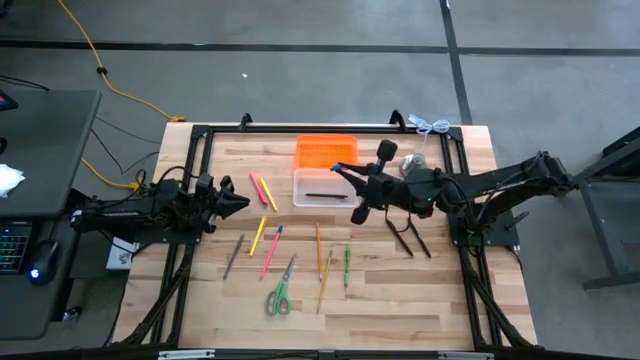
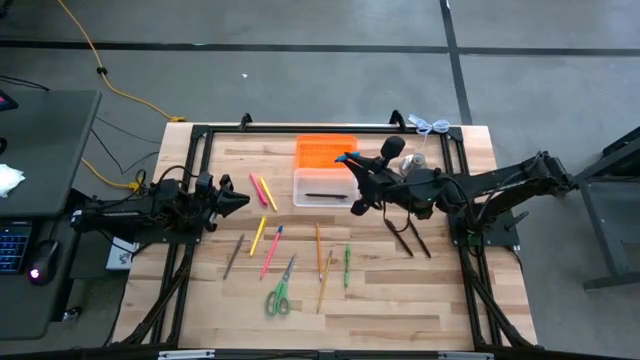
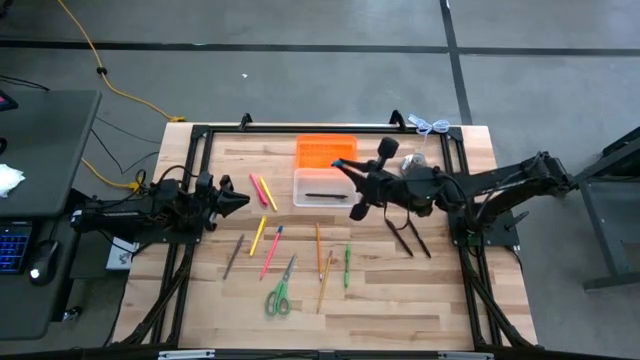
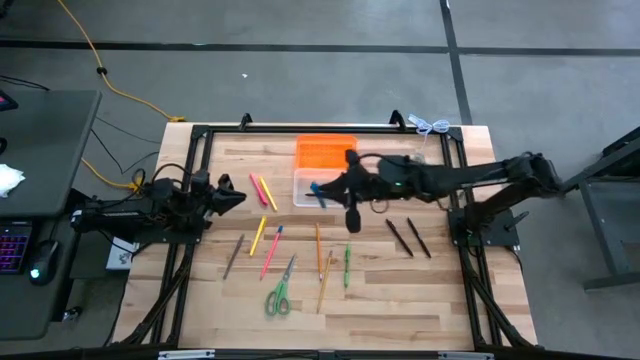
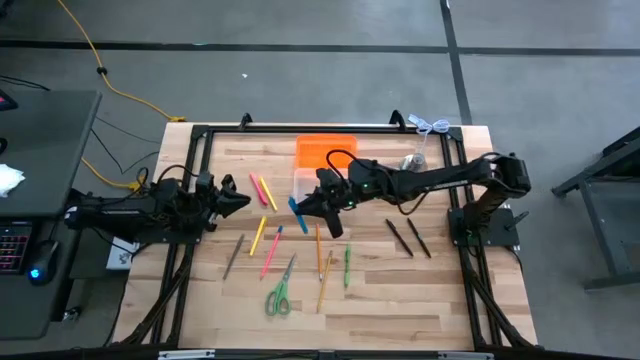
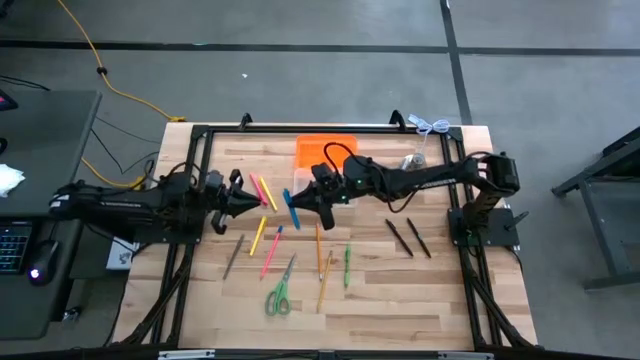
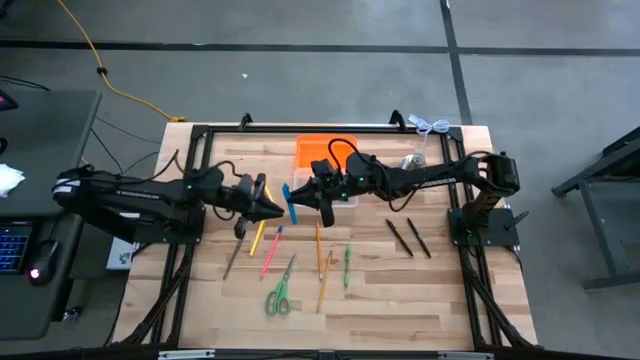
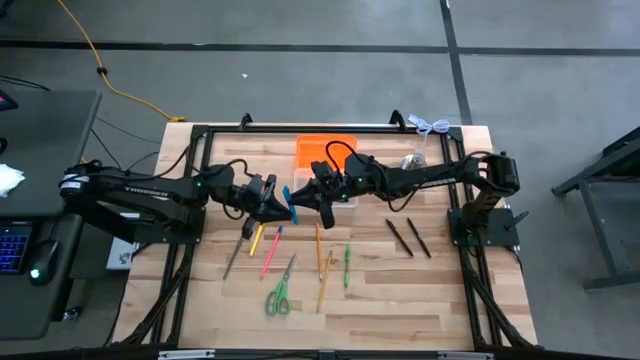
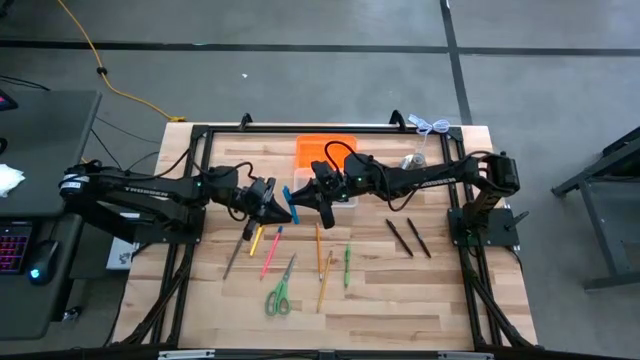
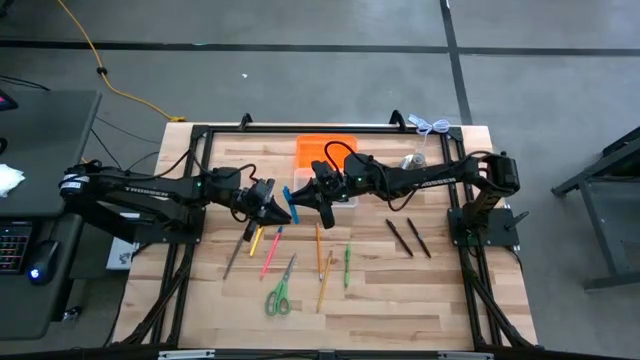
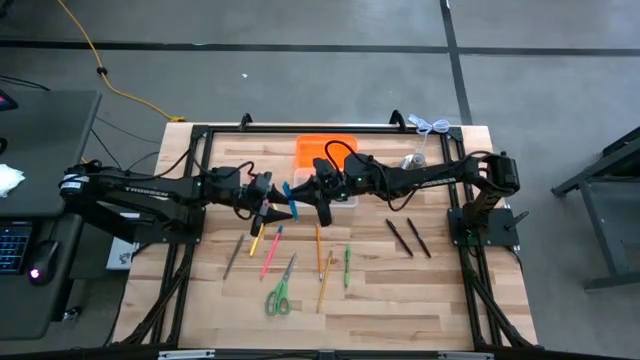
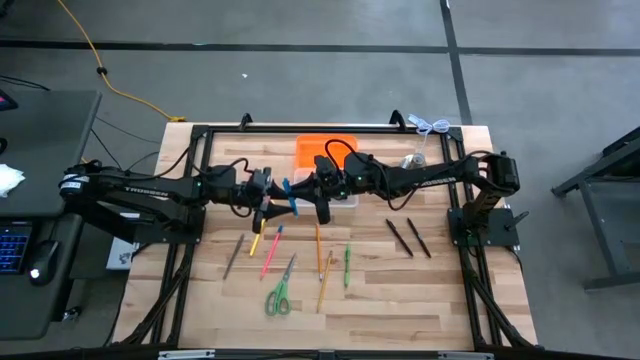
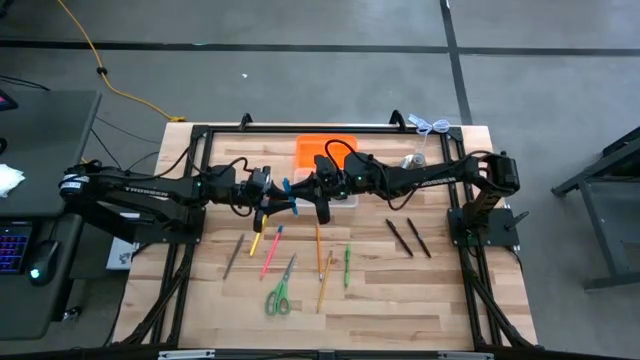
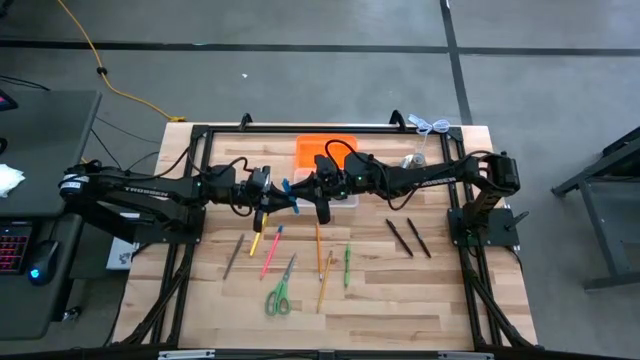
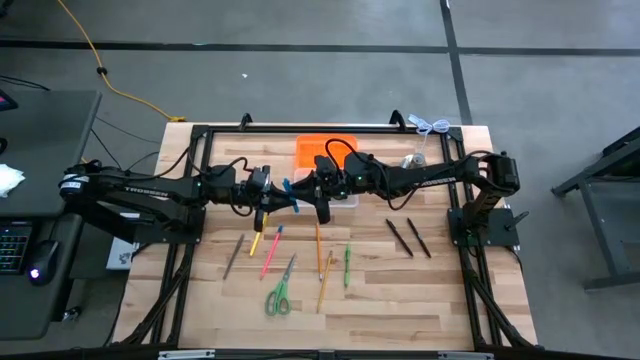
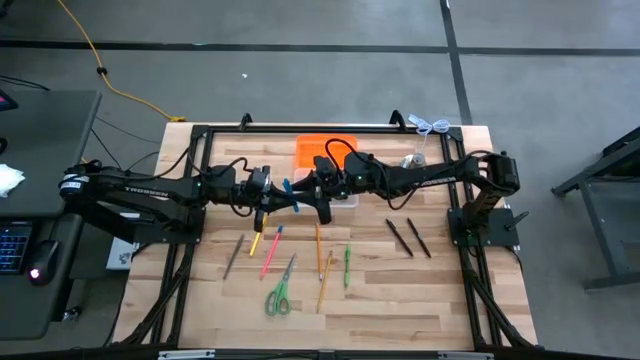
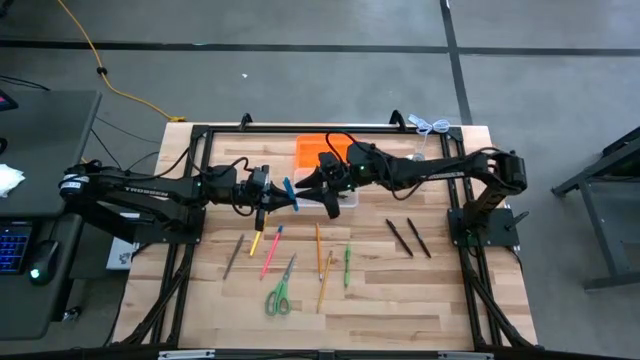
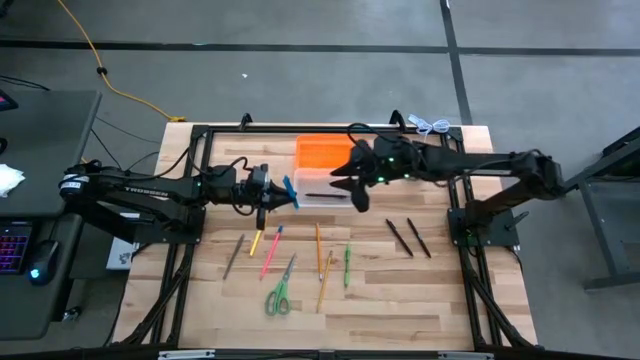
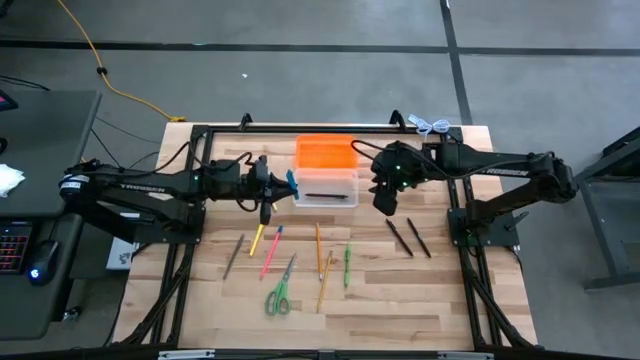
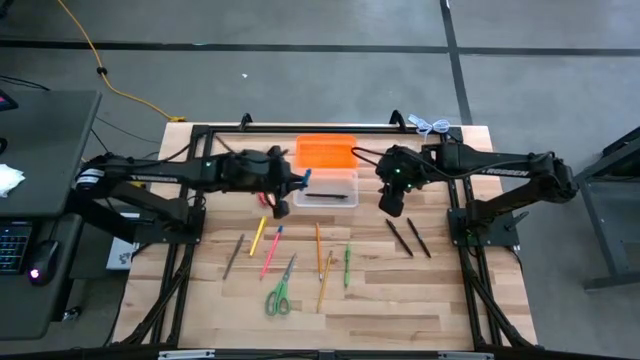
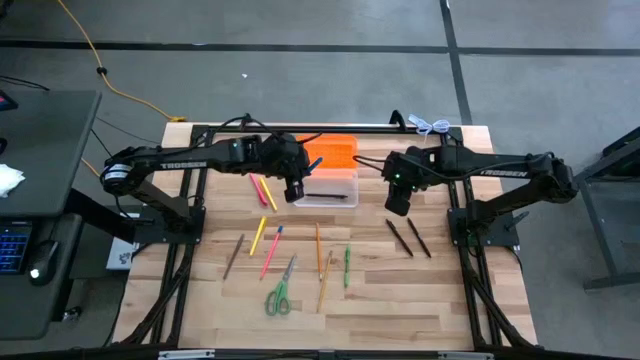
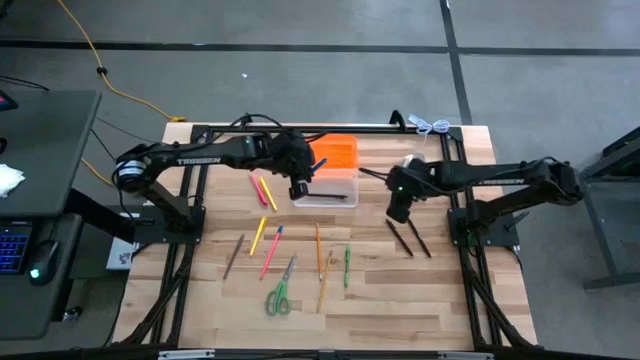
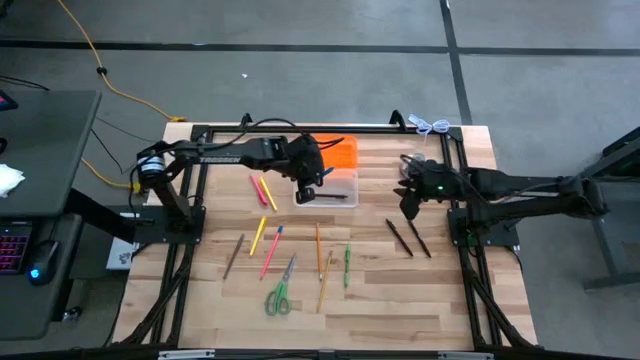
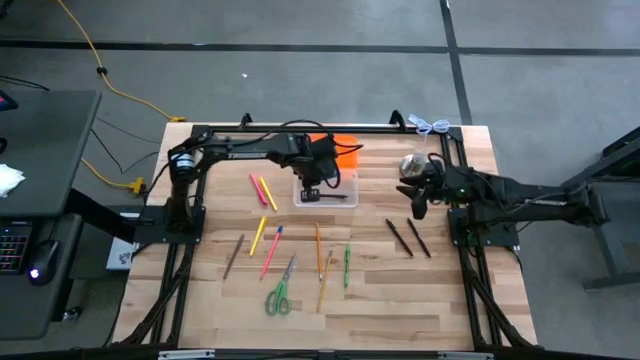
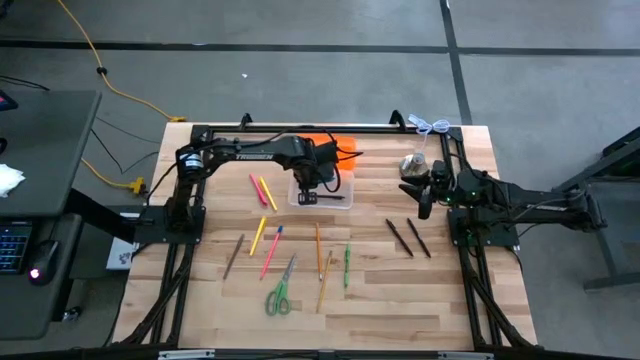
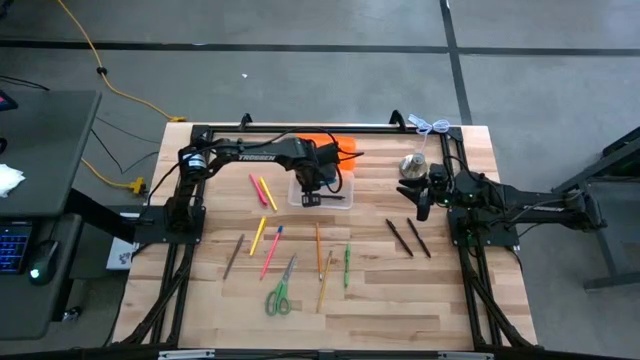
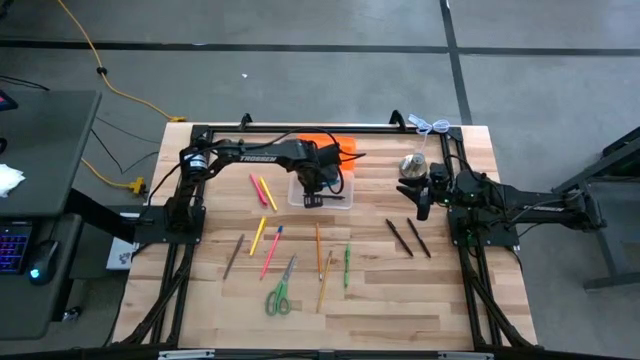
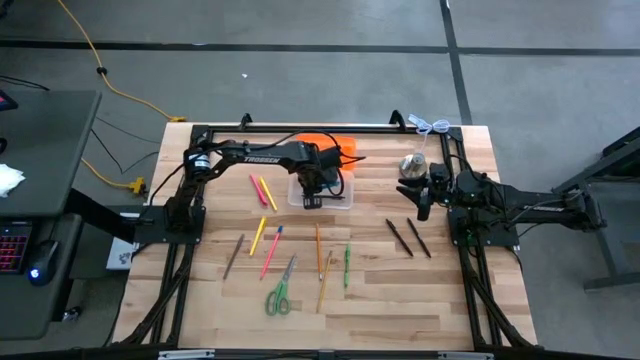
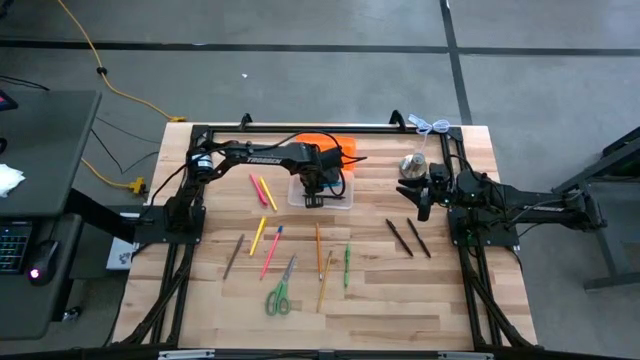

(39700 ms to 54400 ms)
Task: Pick & place school supplies into a supply box
Put the blue pen into the transparent supply box

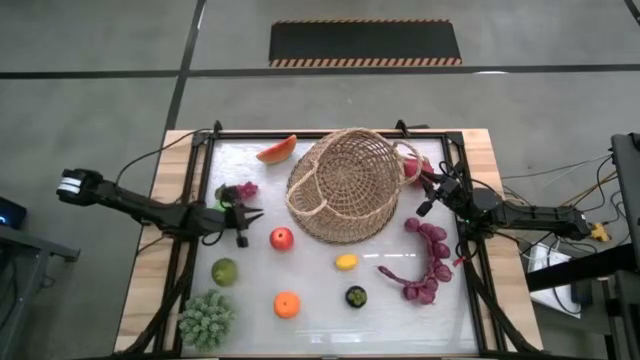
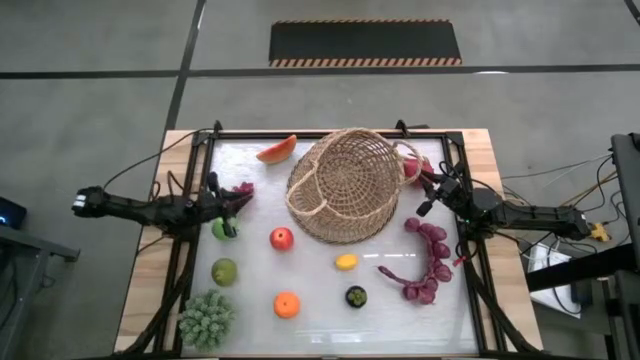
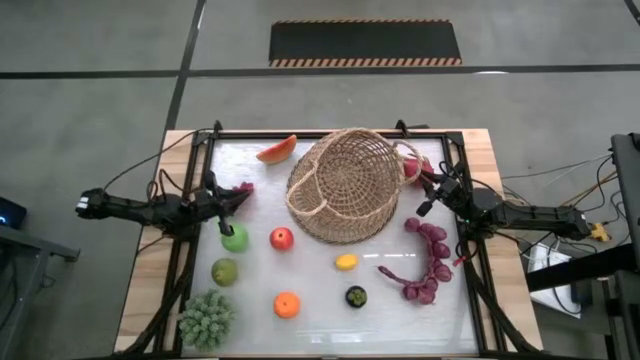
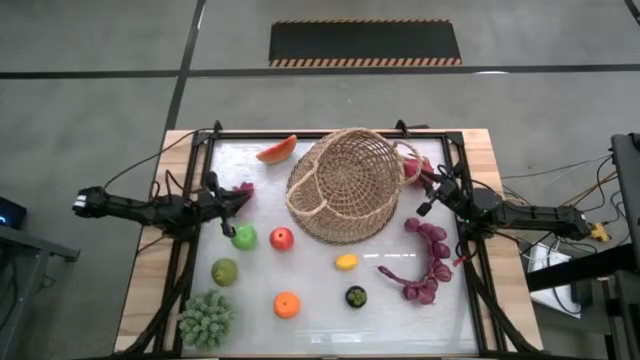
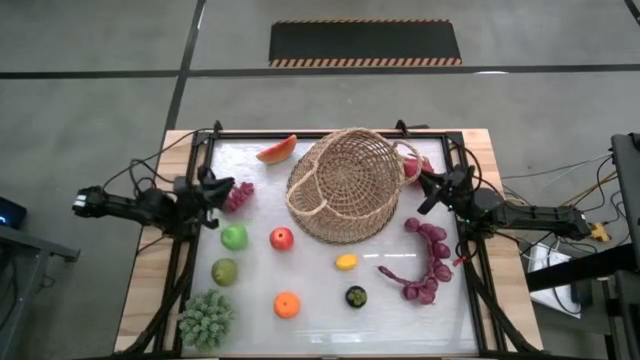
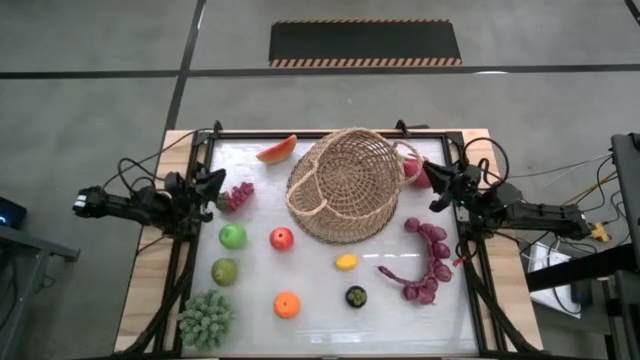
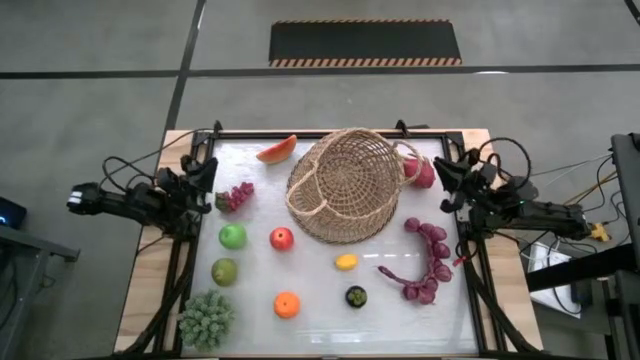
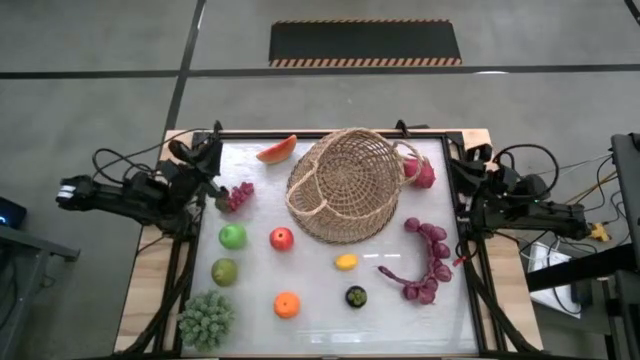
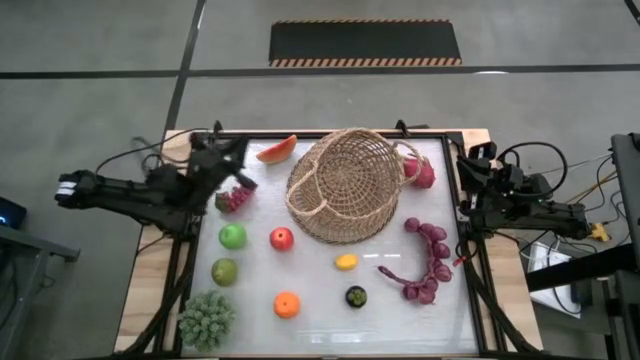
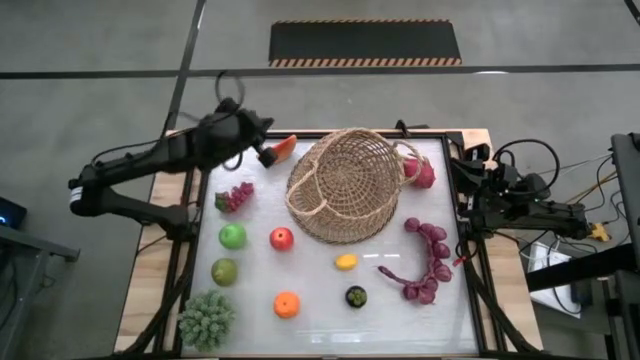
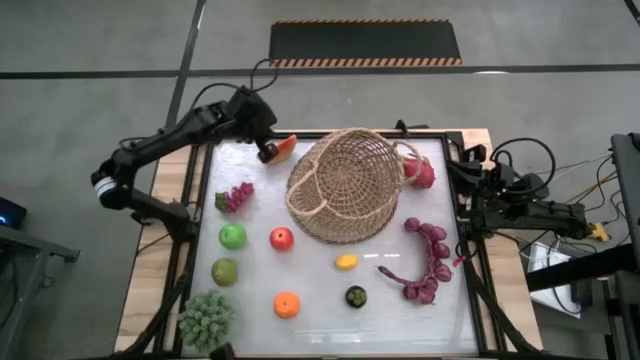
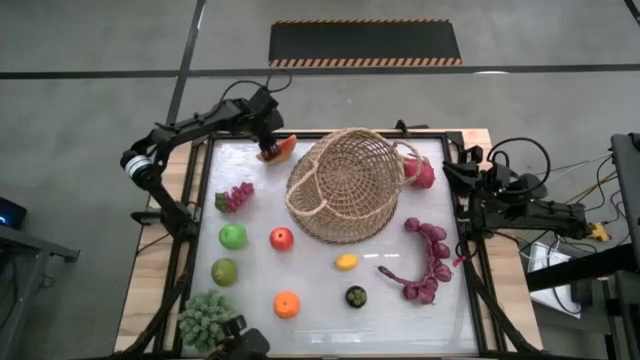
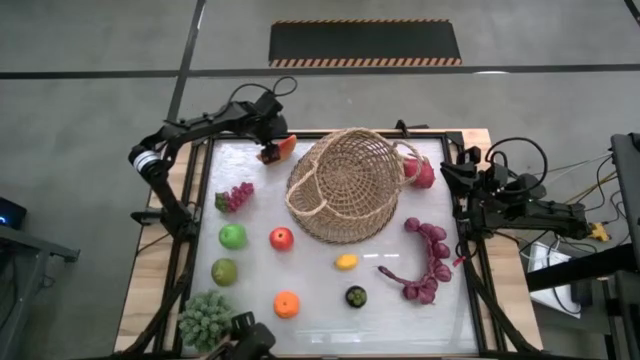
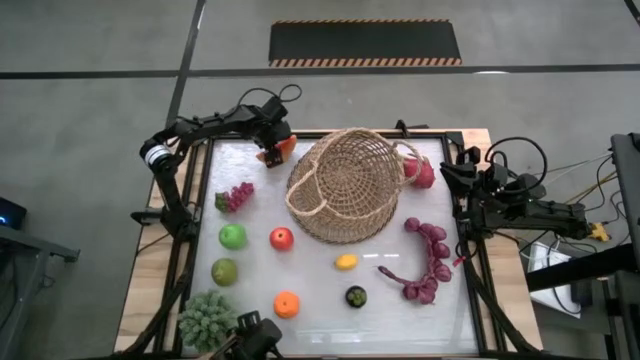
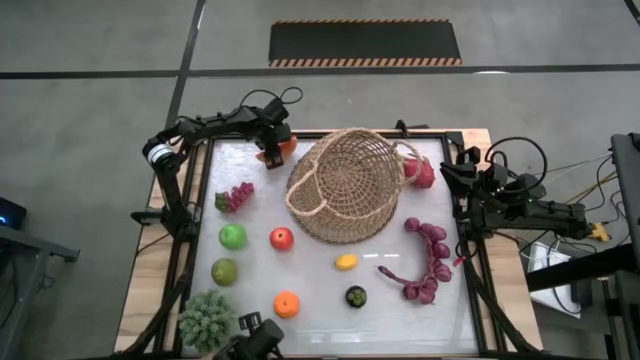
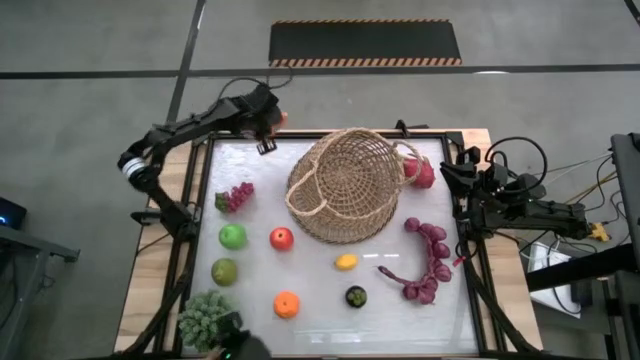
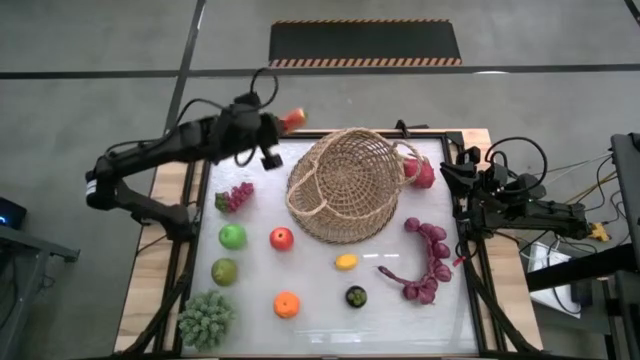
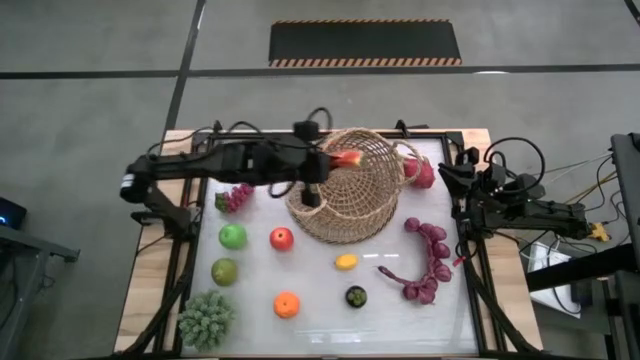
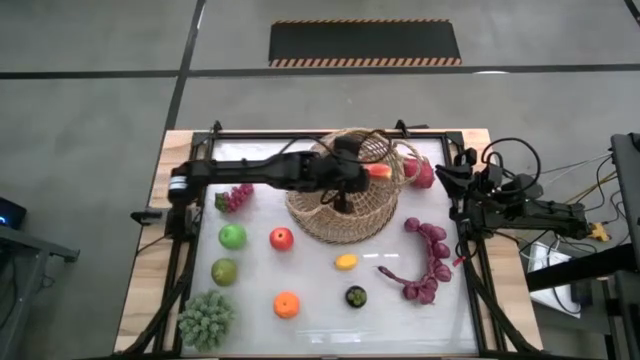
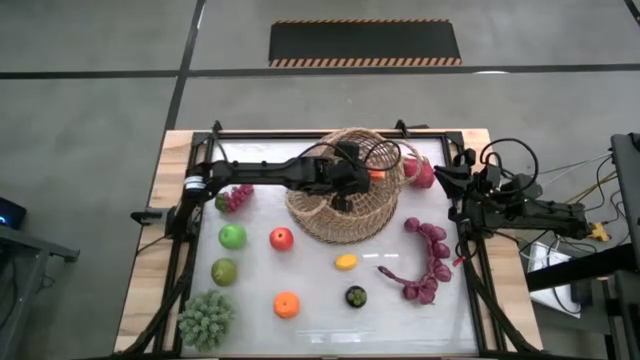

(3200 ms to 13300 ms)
Task: Build produce basket
Put the red watermelon into the brown basket
